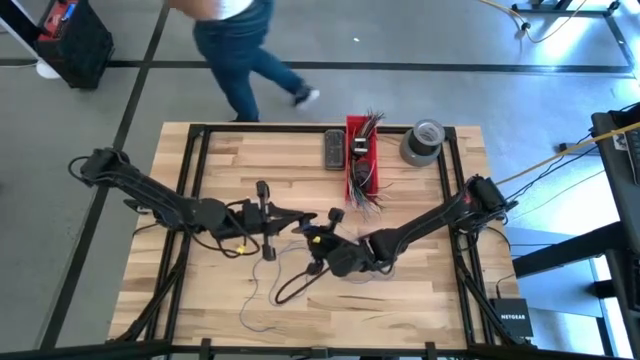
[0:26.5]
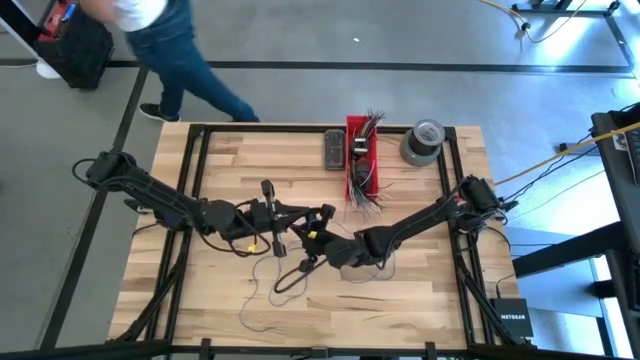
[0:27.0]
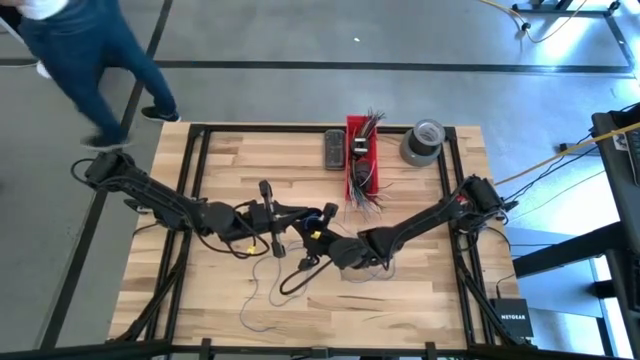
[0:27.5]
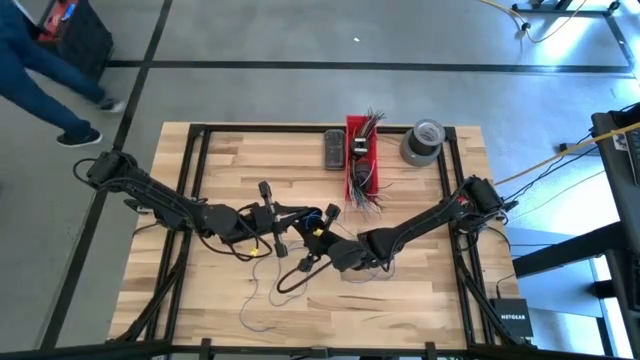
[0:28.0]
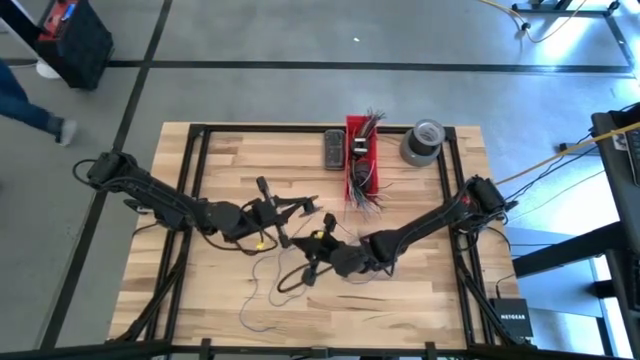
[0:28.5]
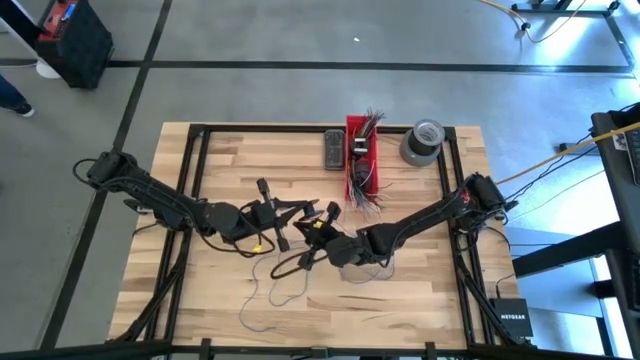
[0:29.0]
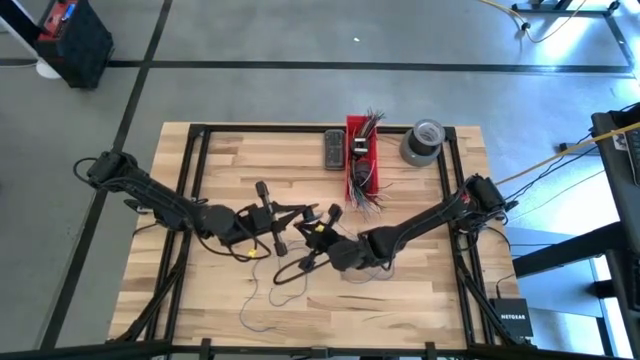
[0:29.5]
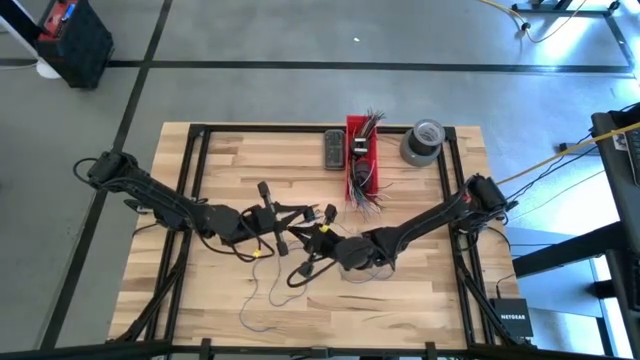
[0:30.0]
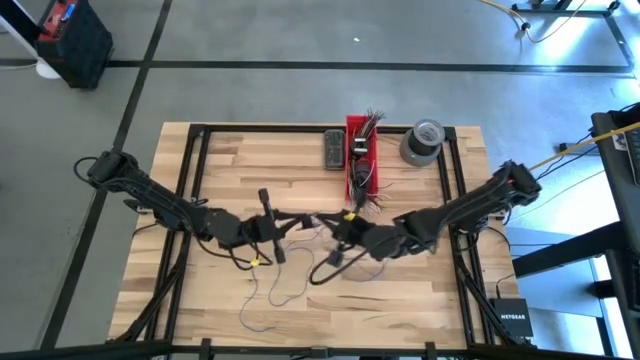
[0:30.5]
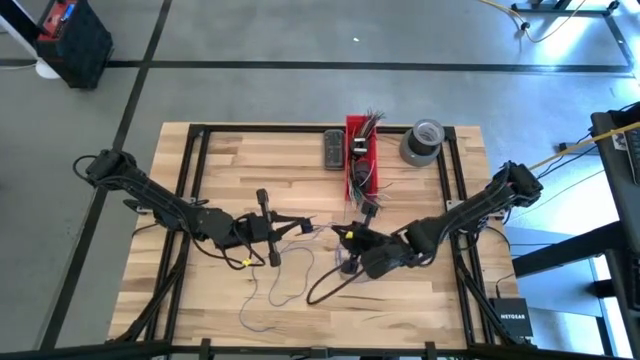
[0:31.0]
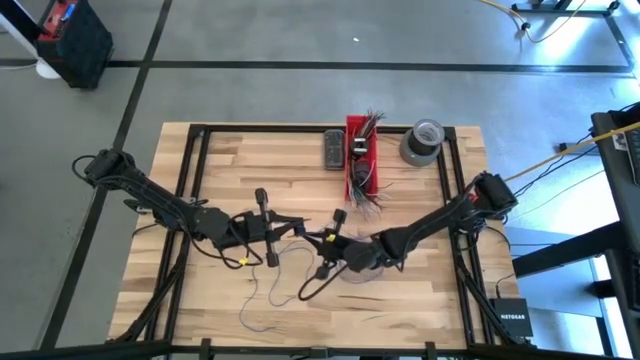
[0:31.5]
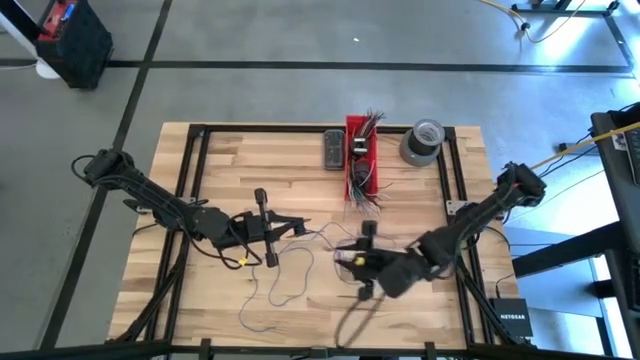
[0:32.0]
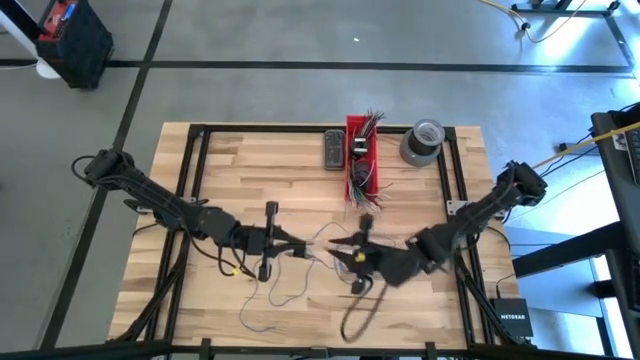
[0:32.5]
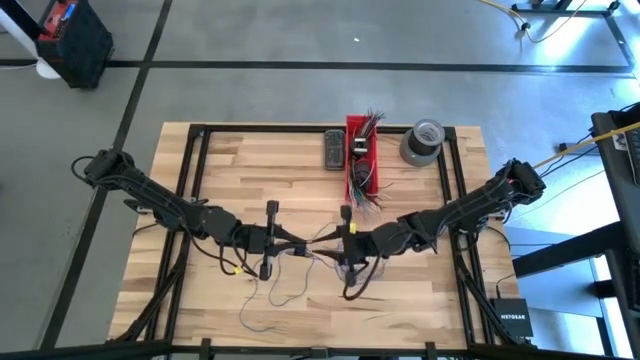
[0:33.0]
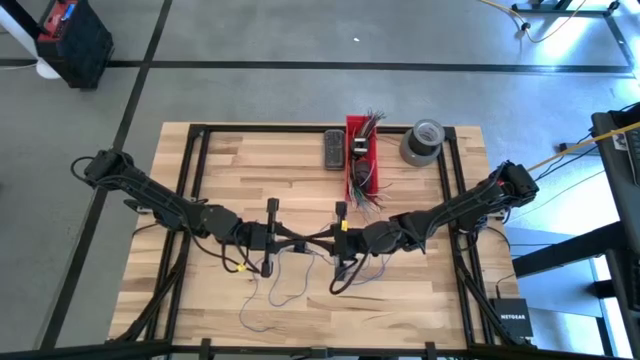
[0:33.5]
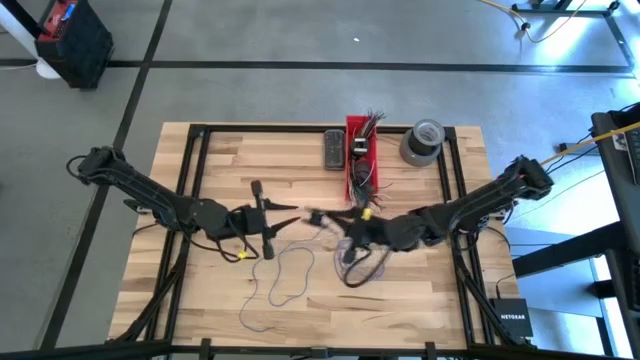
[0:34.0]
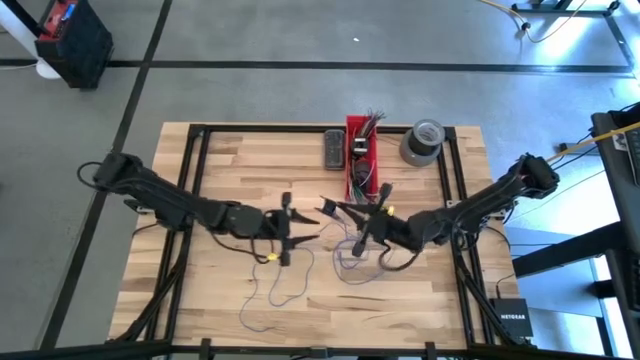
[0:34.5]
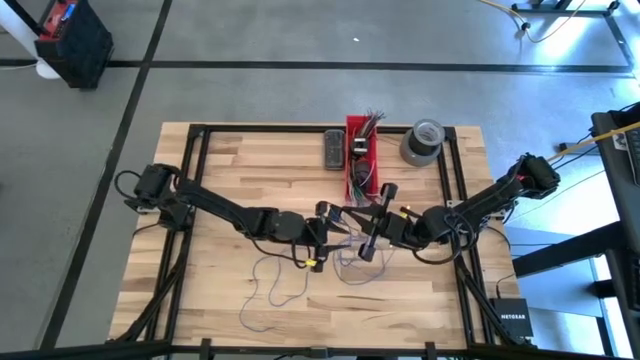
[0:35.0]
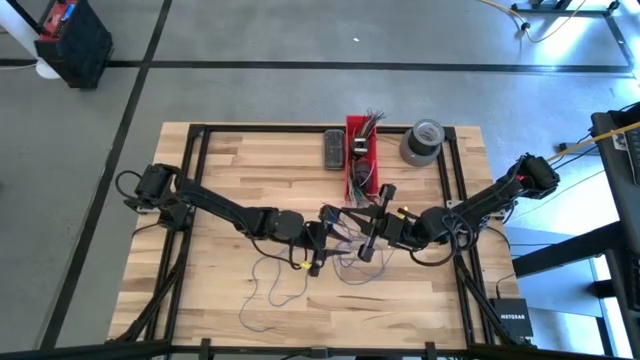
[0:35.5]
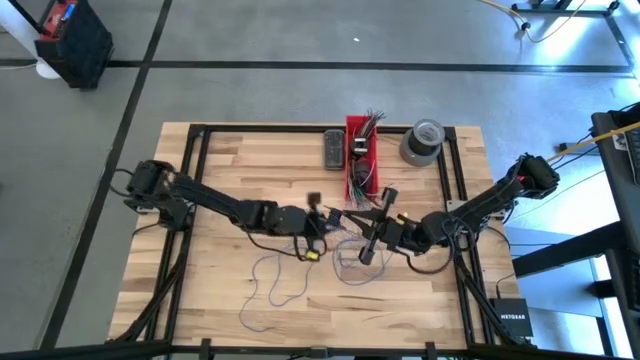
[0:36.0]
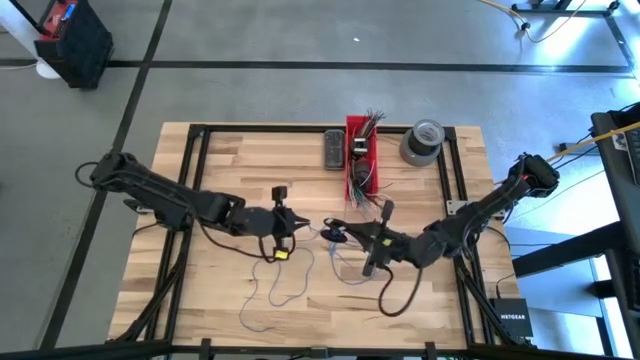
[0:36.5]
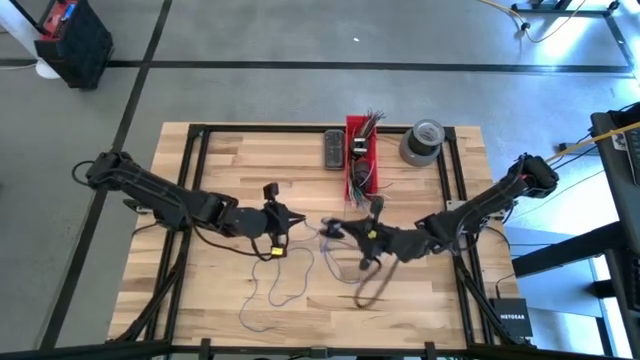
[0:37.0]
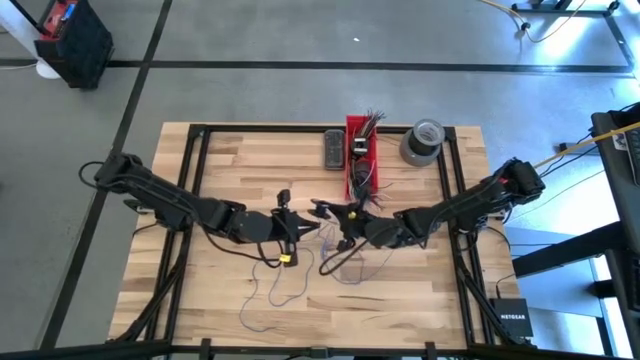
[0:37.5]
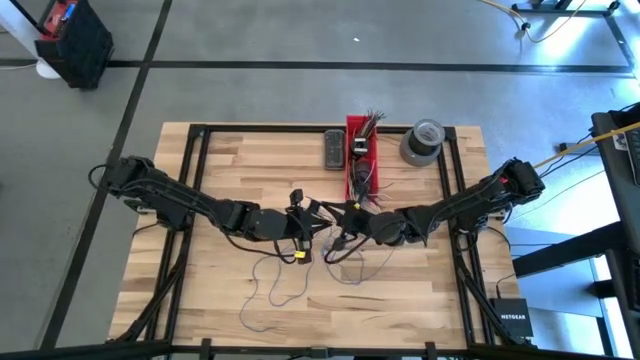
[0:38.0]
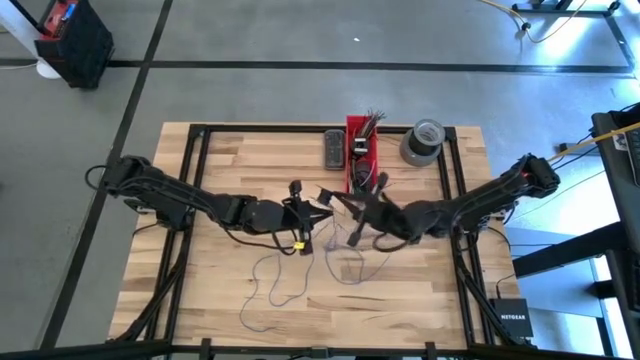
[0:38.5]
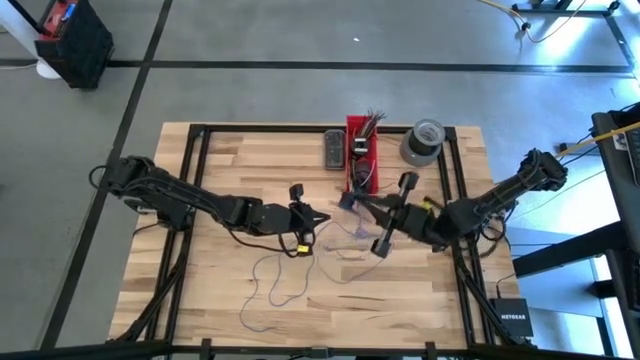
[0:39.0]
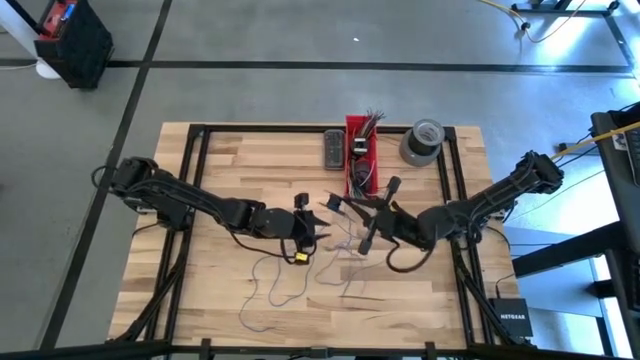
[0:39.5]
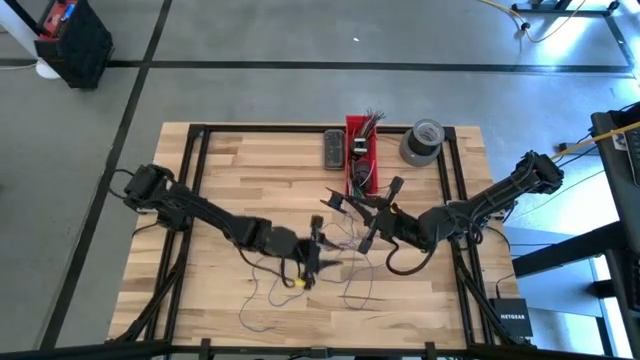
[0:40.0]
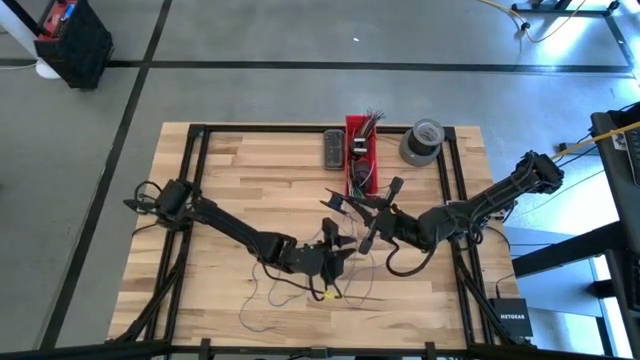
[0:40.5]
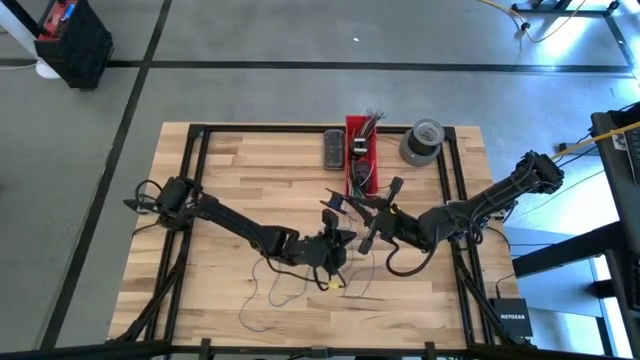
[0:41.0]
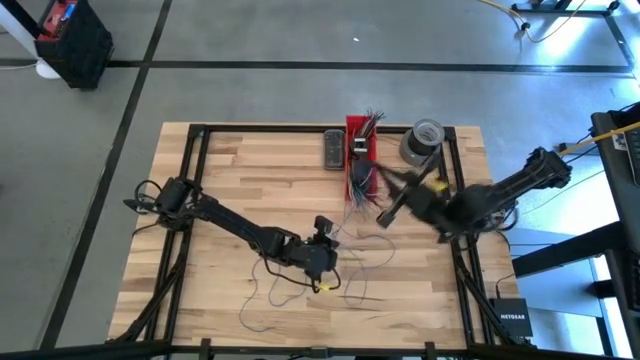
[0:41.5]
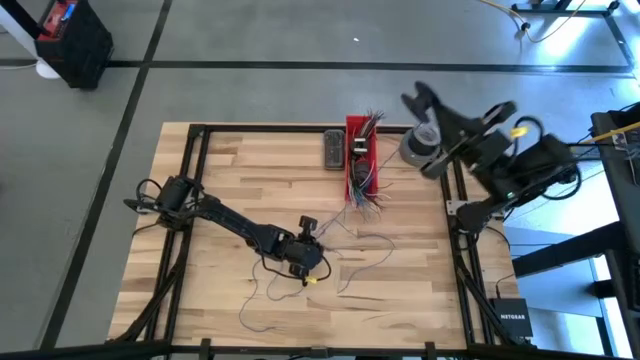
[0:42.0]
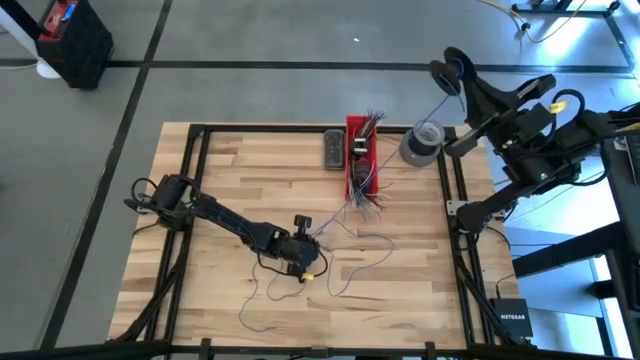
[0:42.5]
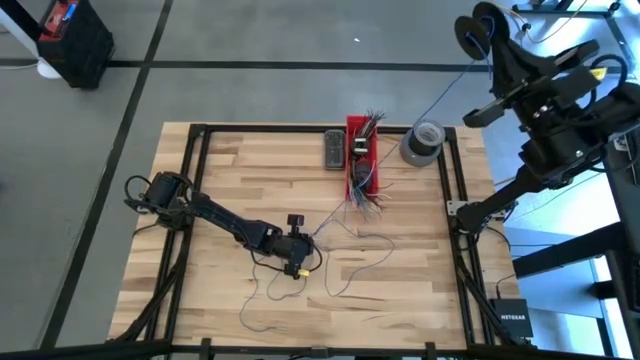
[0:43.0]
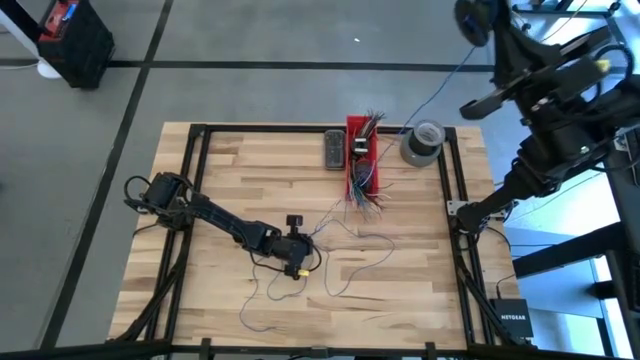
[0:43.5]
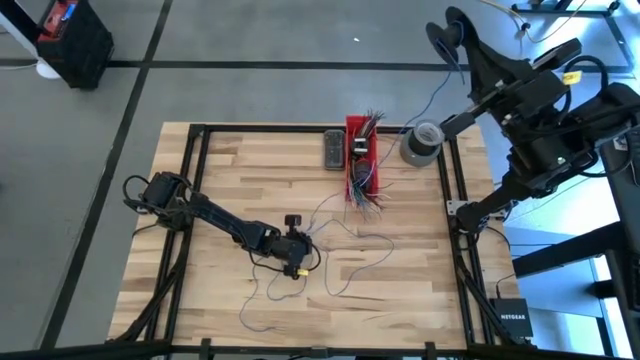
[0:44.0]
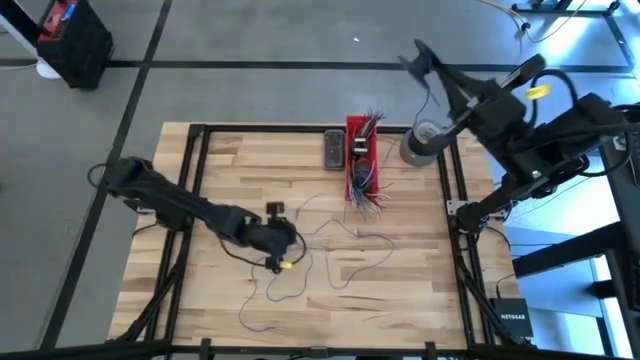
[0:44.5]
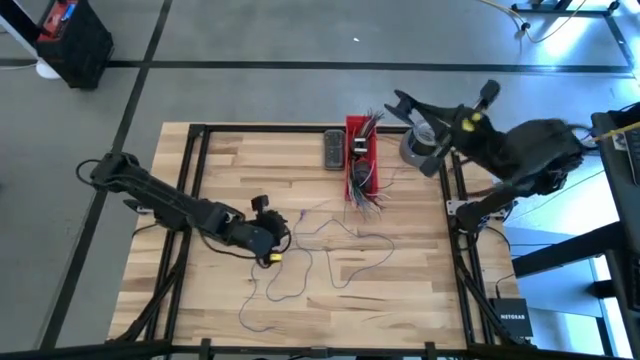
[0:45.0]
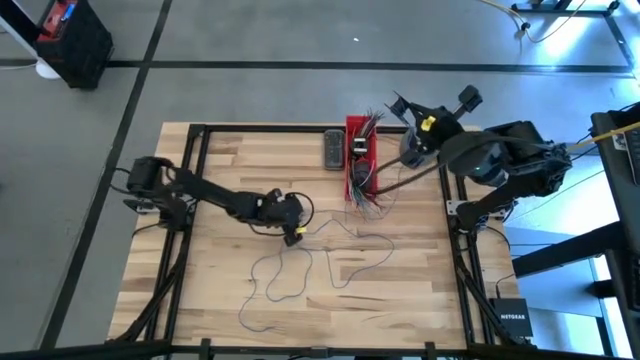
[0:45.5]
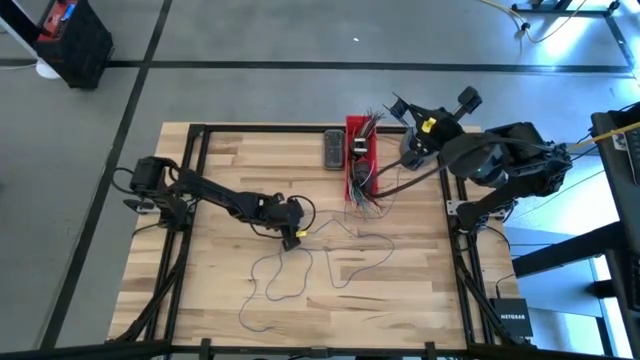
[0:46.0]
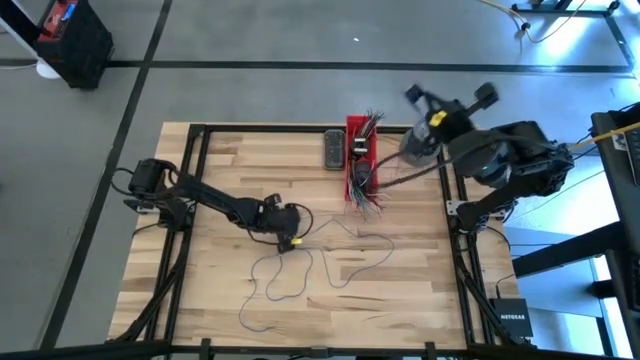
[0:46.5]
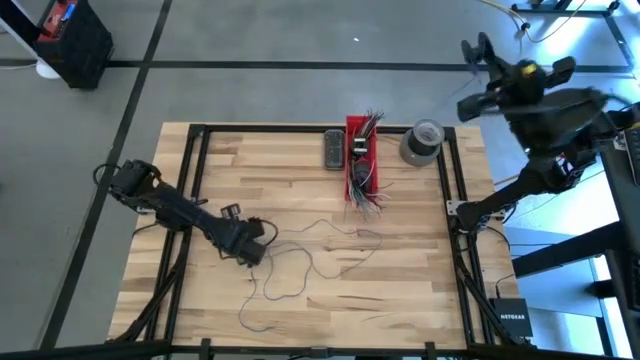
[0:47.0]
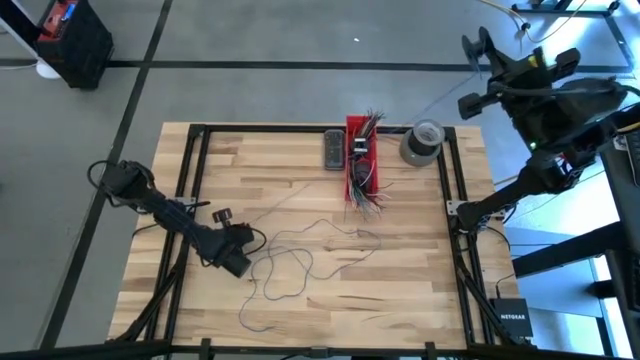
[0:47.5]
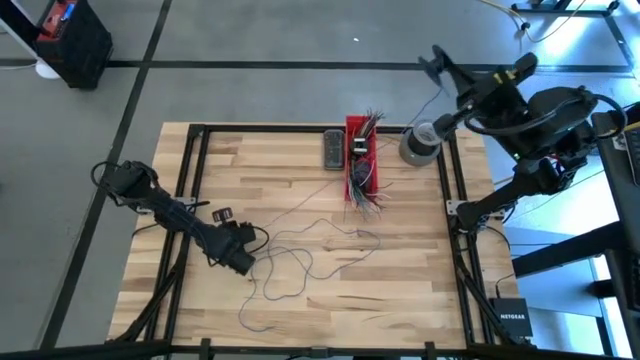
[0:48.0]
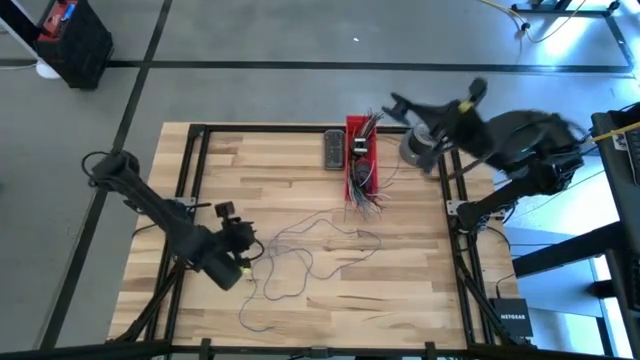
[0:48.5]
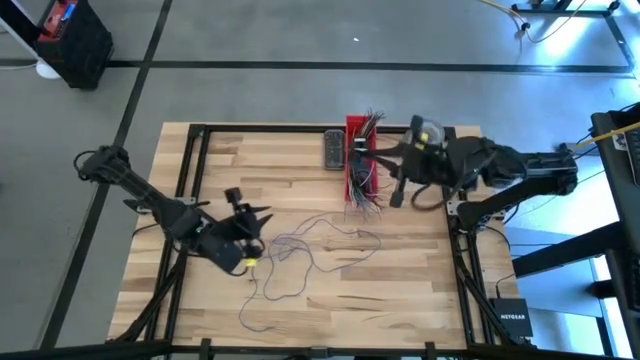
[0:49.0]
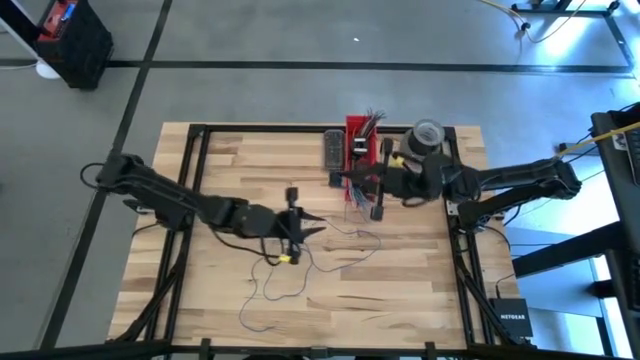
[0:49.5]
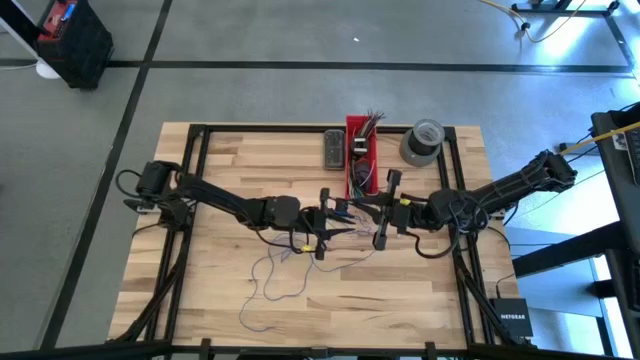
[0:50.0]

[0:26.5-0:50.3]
Task: Coil cords
Coil the blue wire into the black spool
